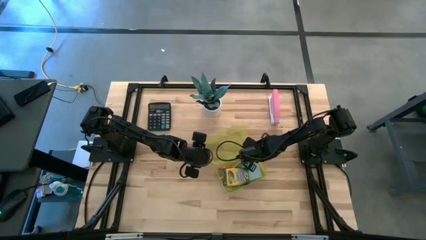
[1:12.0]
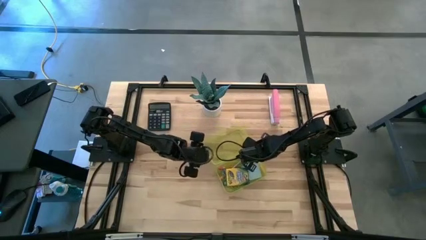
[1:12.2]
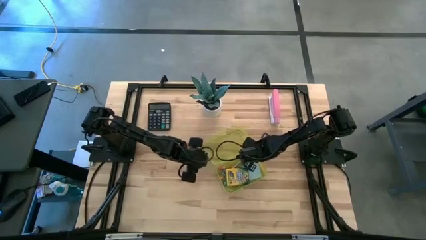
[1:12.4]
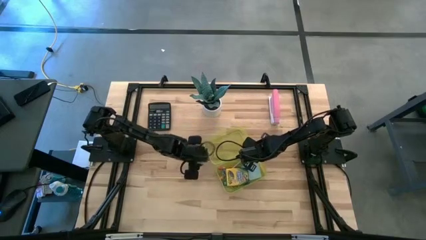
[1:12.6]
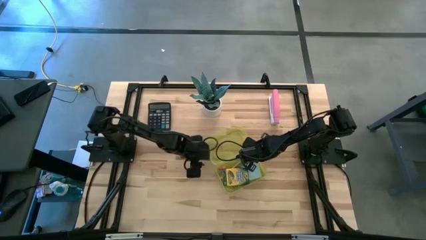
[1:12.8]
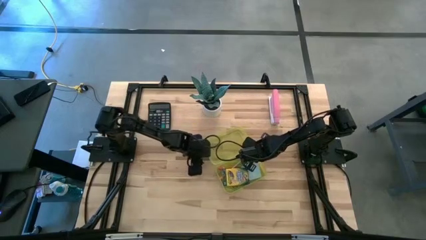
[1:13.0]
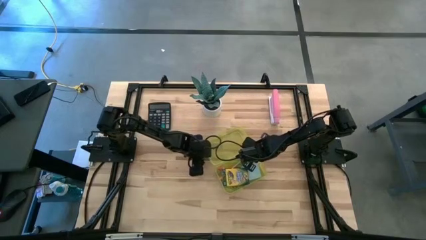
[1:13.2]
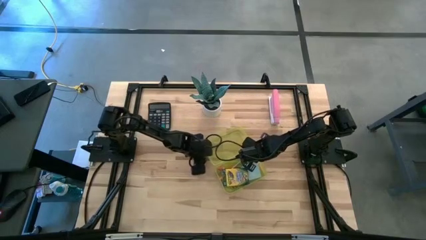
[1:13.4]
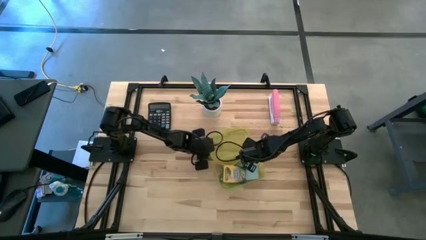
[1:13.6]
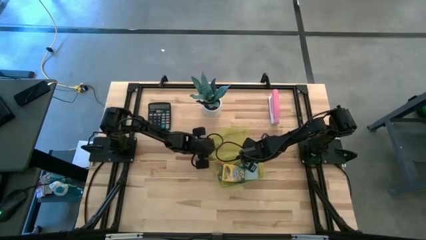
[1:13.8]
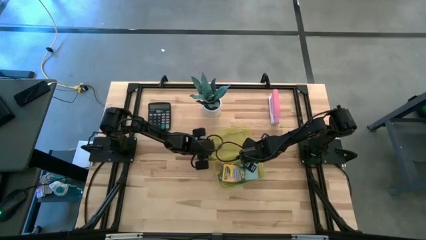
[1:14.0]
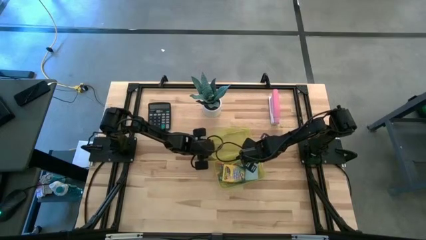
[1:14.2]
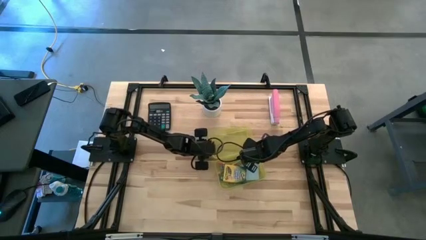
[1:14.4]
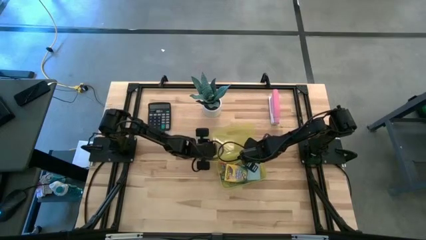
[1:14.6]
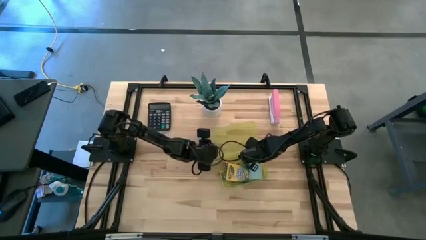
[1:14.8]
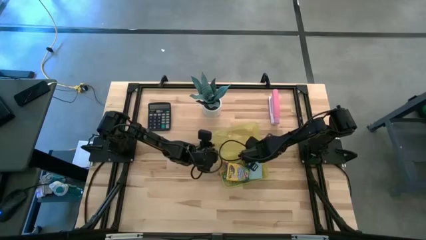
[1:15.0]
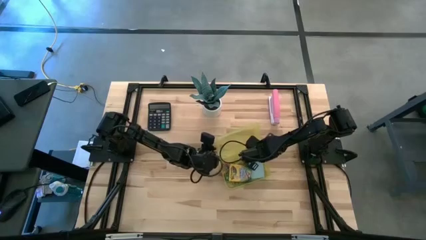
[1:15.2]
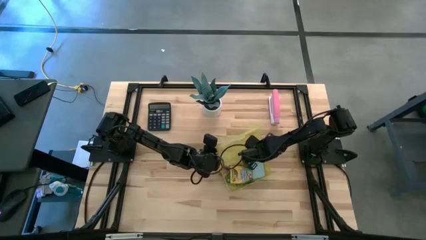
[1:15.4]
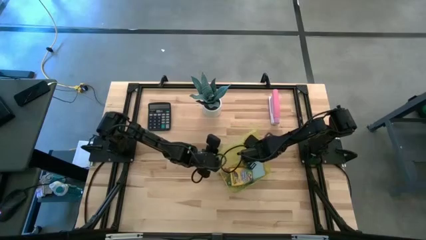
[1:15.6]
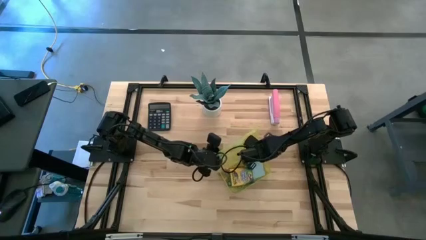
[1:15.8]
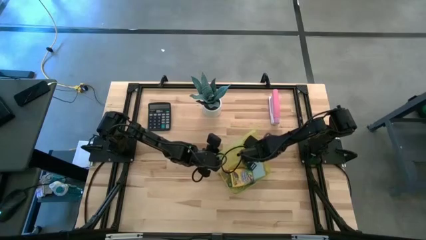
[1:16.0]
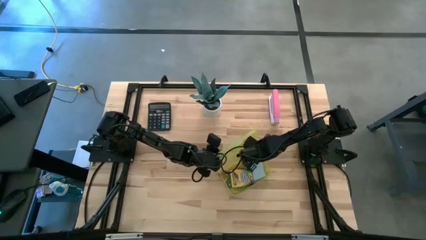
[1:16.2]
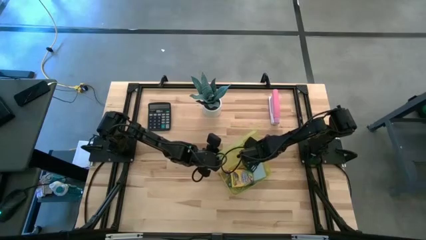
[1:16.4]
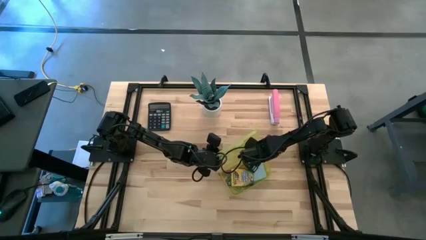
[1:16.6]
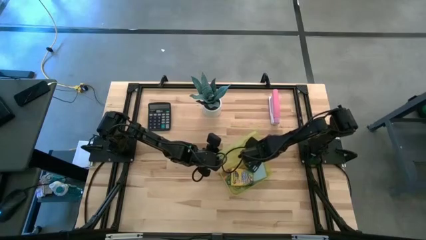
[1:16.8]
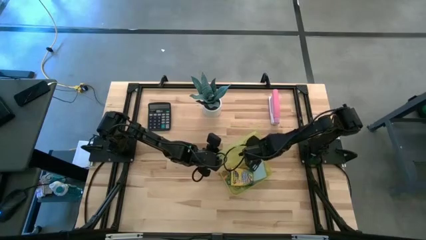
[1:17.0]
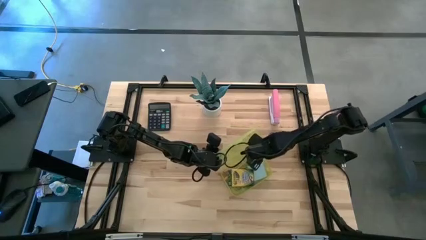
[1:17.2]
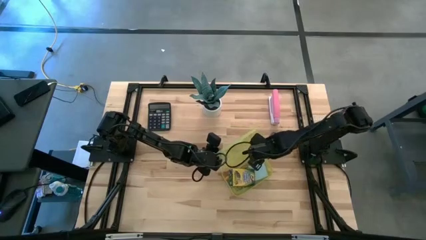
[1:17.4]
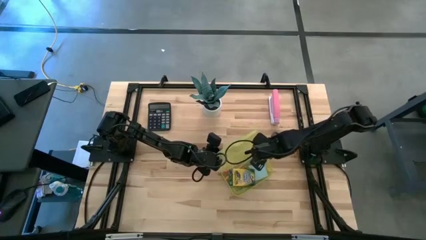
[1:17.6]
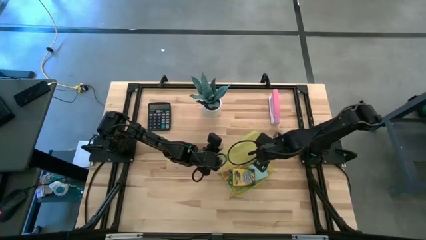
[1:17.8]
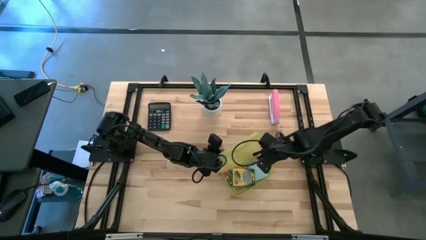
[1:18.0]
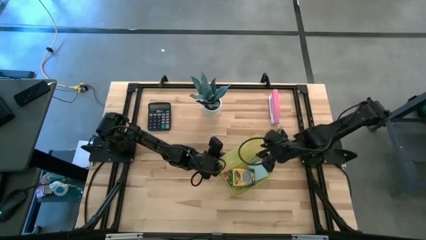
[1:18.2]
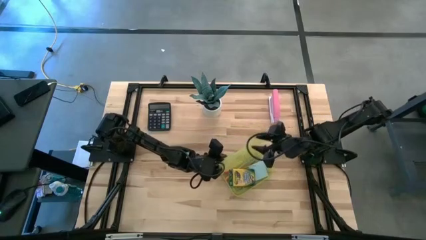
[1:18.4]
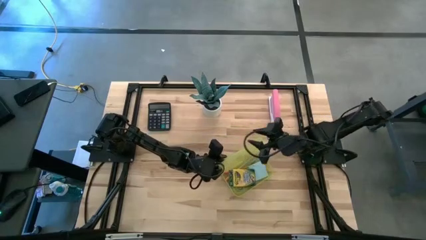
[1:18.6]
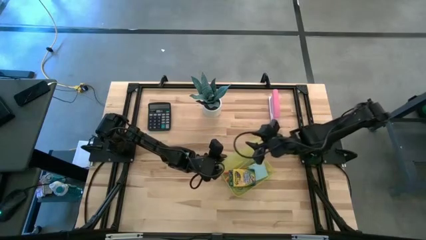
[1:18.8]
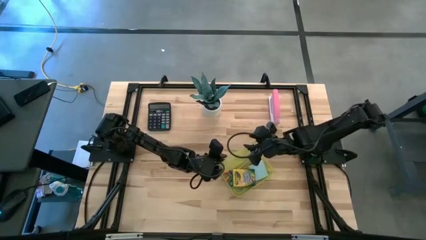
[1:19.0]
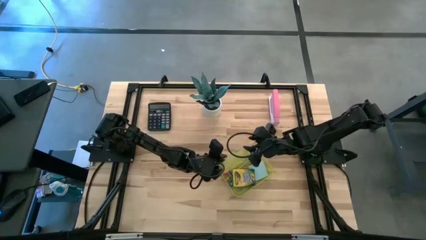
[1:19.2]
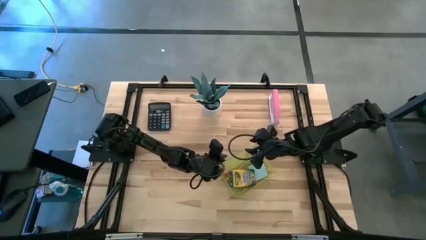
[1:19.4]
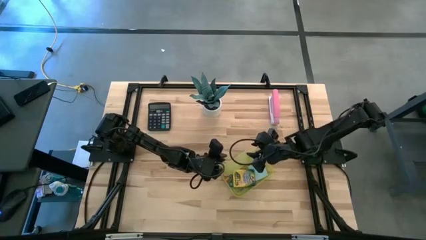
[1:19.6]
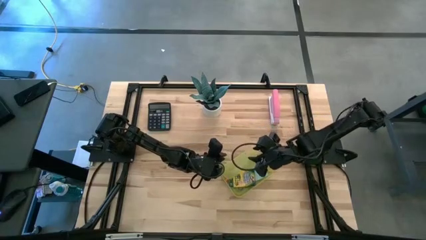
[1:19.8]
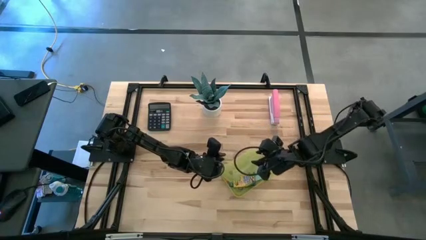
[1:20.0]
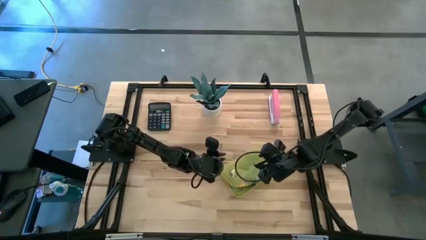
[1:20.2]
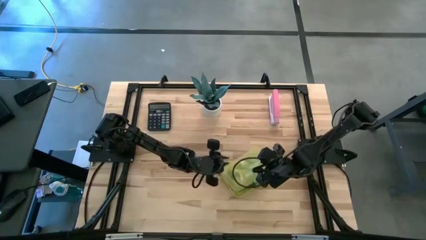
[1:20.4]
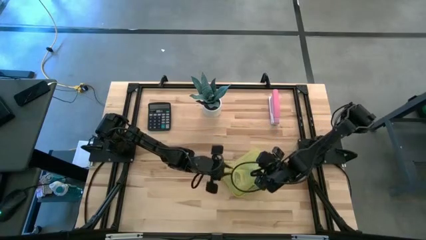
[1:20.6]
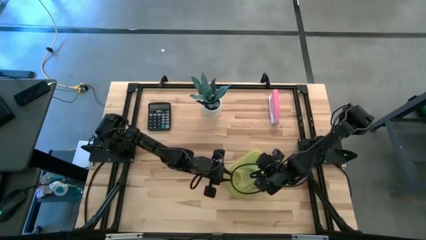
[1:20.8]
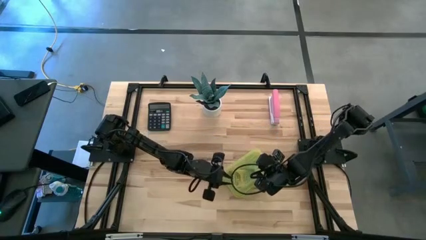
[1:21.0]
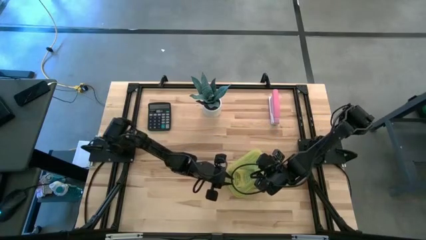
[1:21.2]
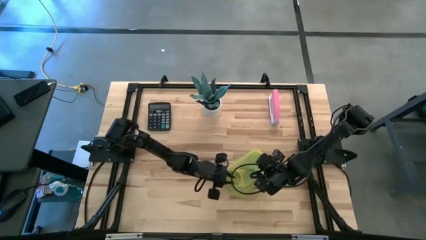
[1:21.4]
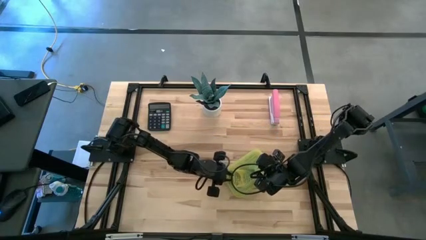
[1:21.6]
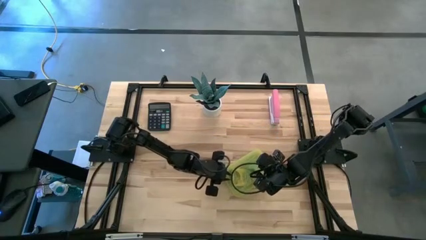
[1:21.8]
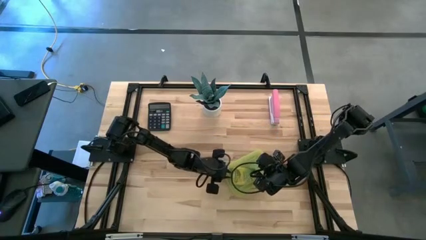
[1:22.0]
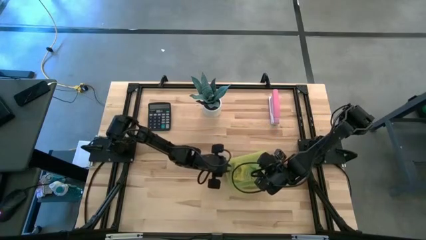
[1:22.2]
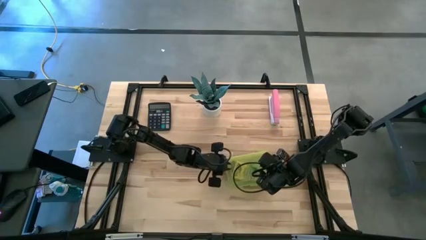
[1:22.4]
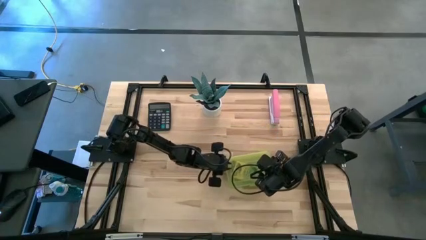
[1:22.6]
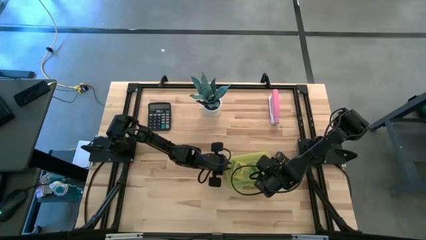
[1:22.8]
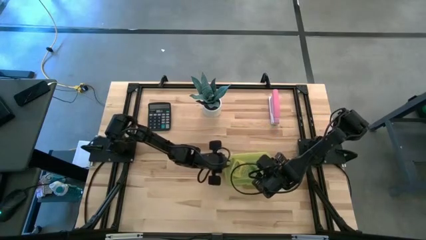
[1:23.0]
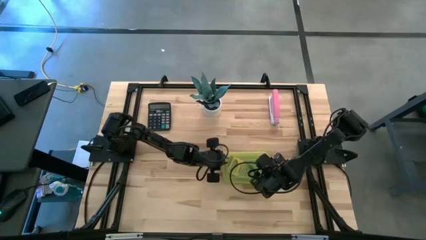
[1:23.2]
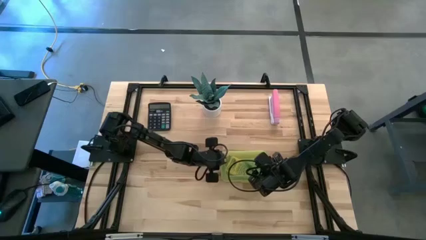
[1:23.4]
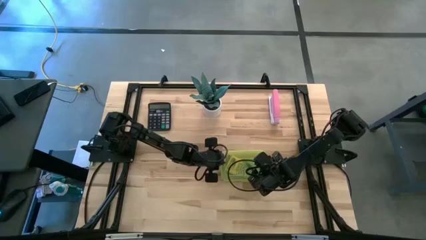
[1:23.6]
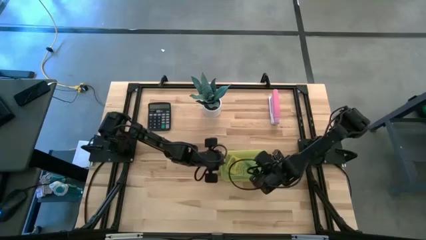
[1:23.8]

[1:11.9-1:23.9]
Task: Pack school essentials
Close the yellow school supplies box
